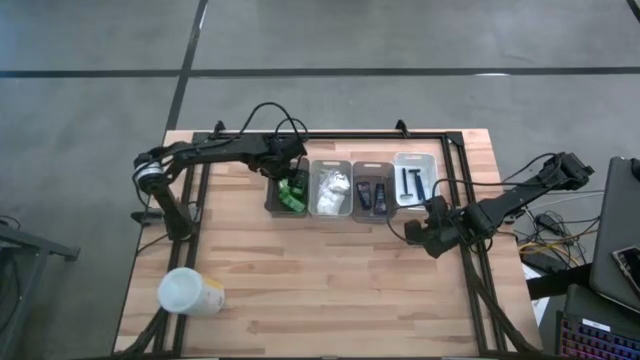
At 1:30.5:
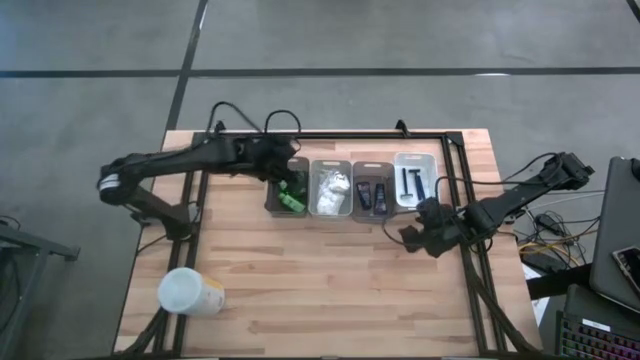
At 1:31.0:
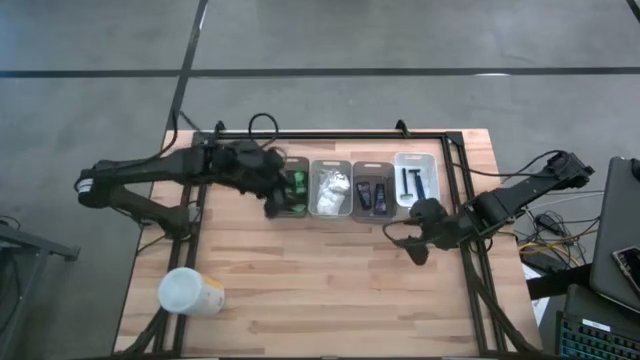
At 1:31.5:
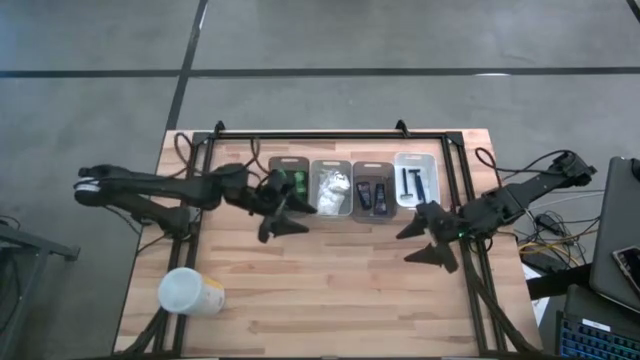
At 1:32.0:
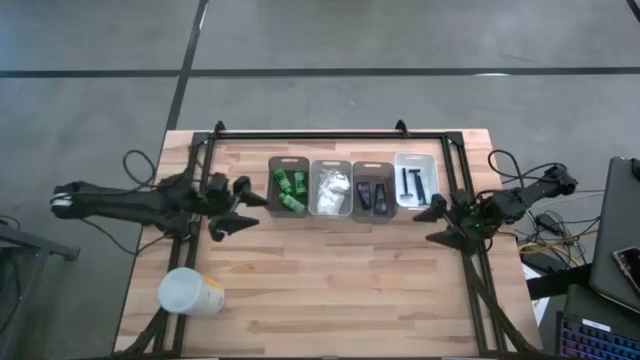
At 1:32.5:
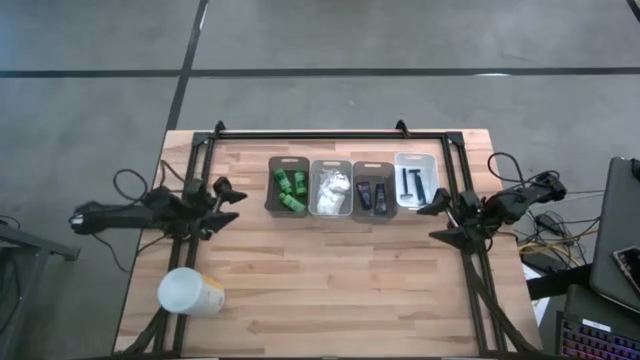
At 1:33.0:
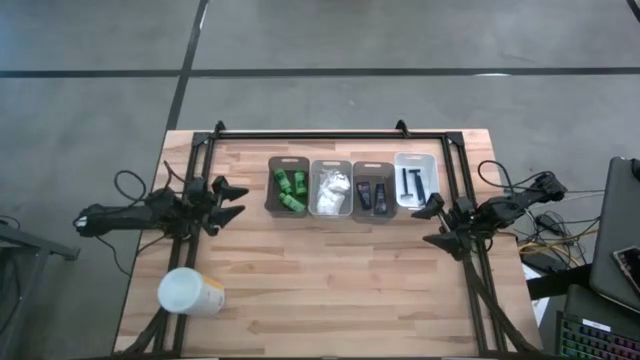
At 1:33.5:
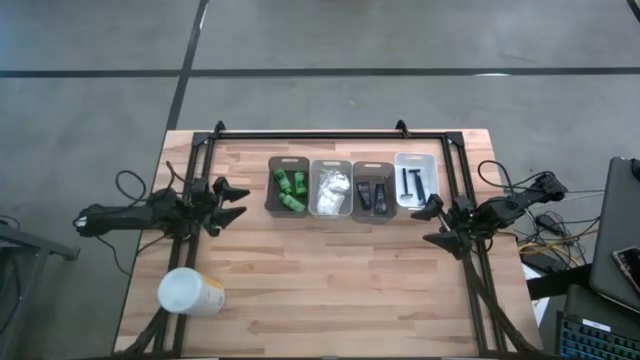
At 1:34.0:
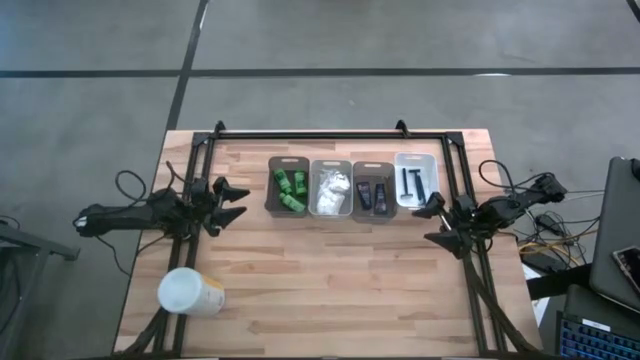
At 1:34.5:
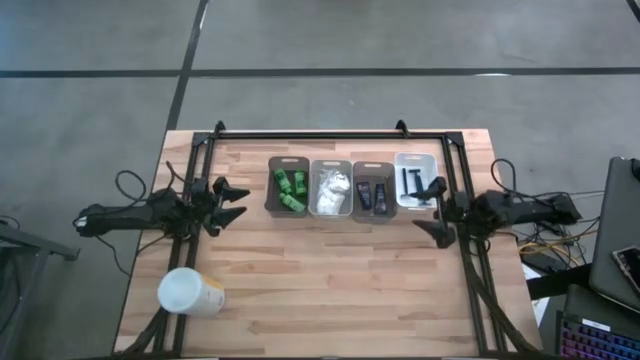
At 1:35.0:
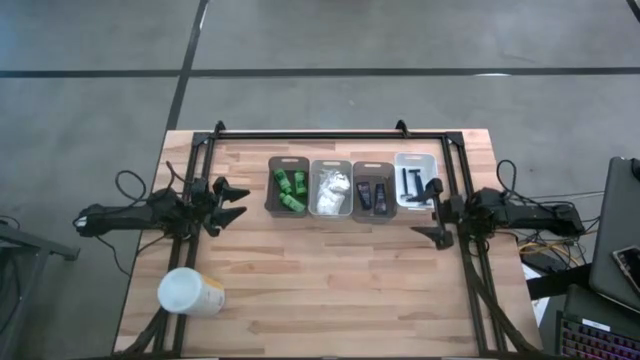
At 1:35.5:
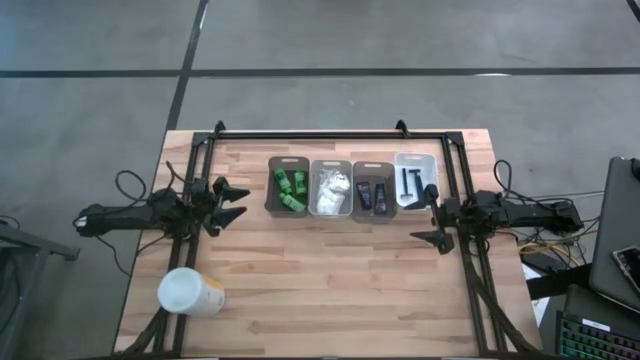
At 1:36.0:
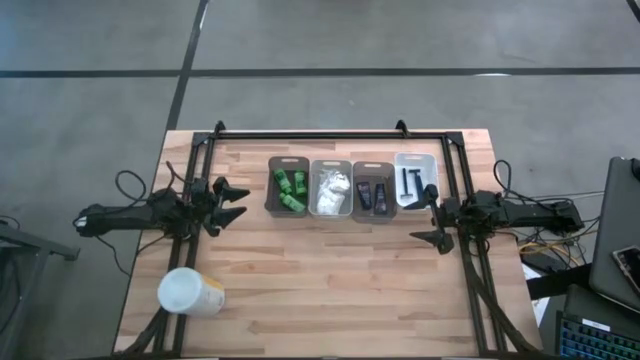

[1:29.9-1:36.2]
Task: Pick & Place Travel size toiletries
Return to Home Position

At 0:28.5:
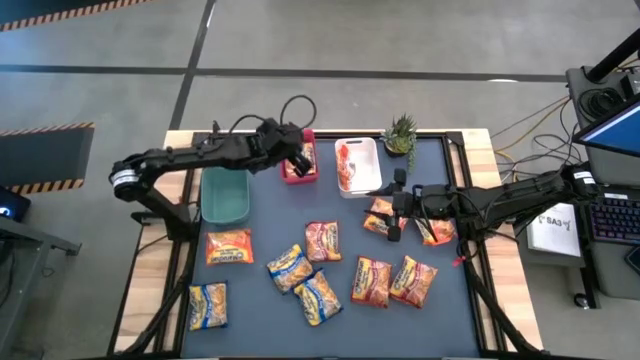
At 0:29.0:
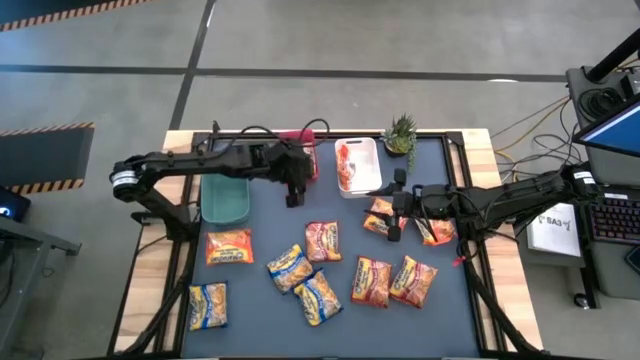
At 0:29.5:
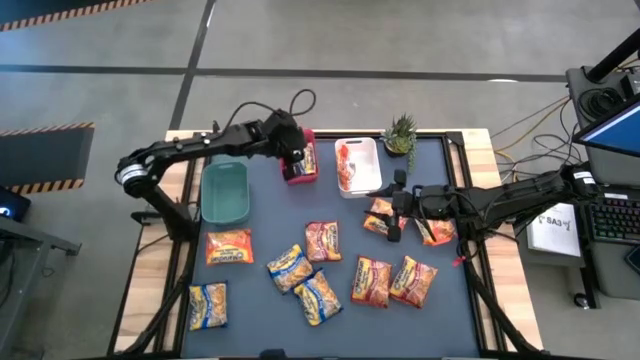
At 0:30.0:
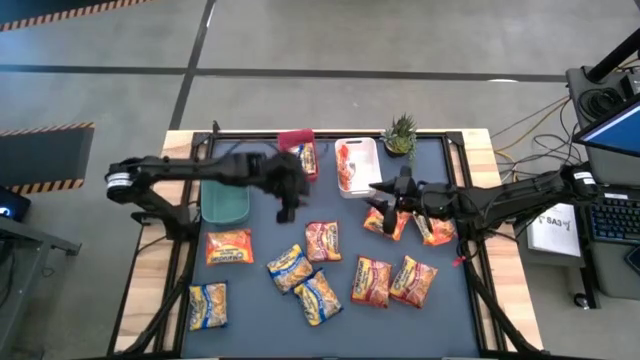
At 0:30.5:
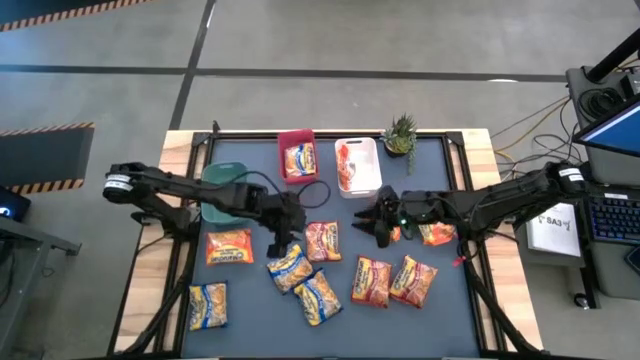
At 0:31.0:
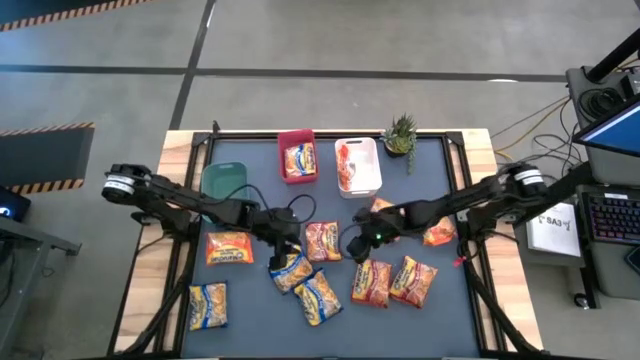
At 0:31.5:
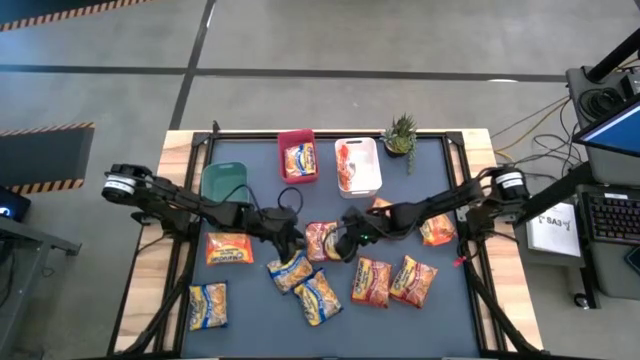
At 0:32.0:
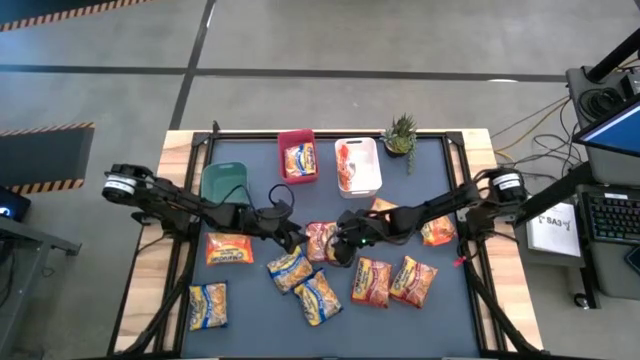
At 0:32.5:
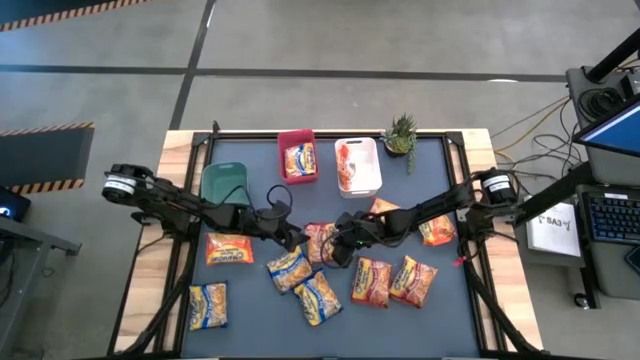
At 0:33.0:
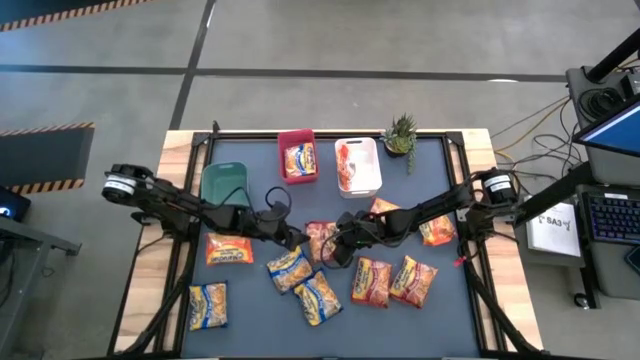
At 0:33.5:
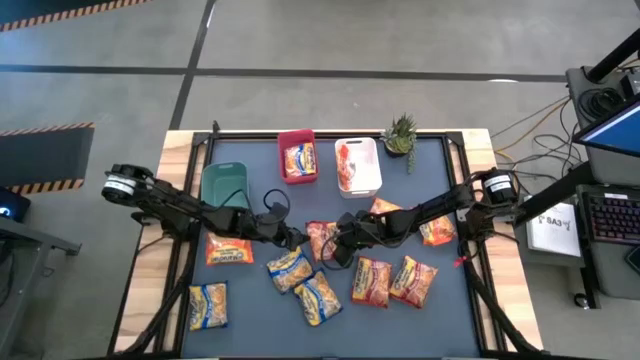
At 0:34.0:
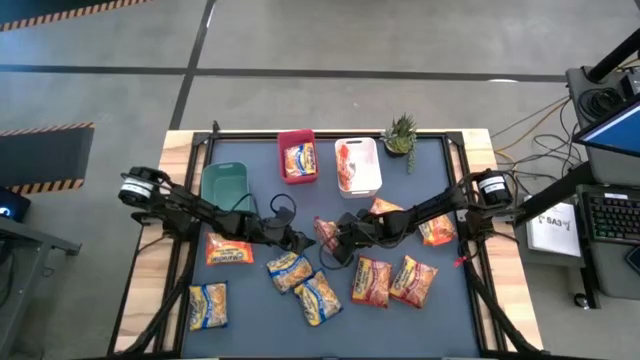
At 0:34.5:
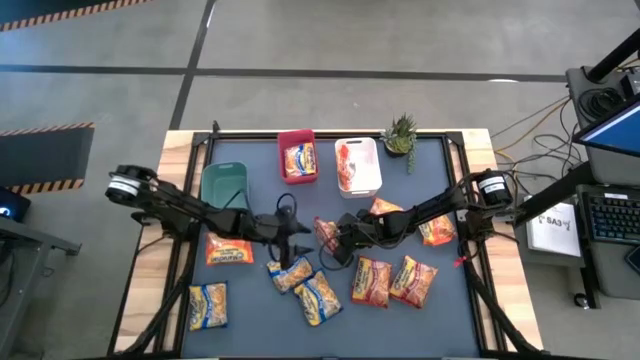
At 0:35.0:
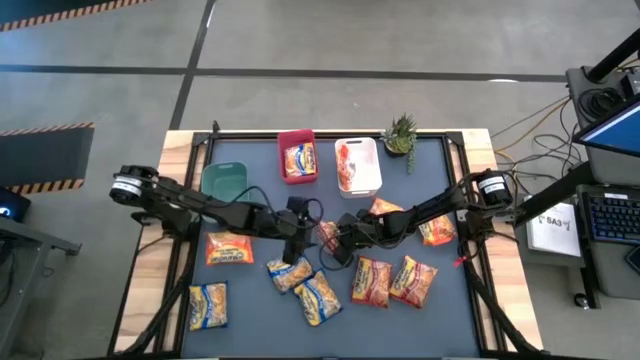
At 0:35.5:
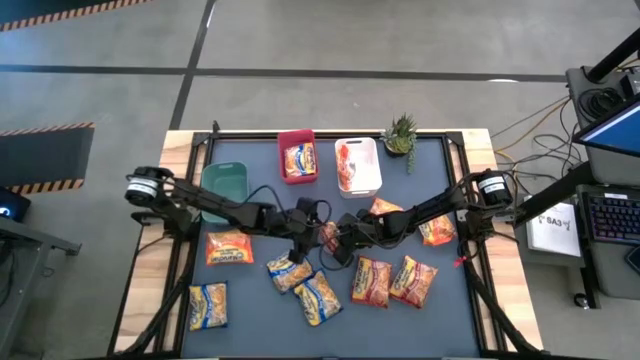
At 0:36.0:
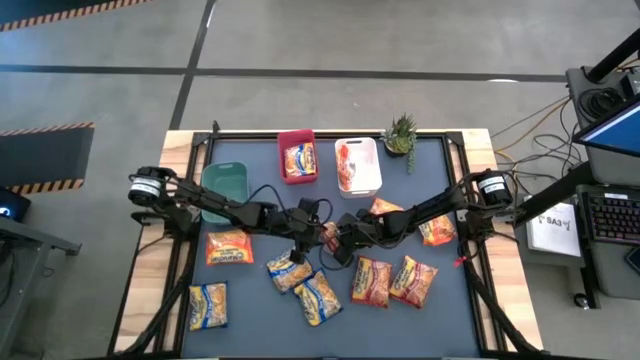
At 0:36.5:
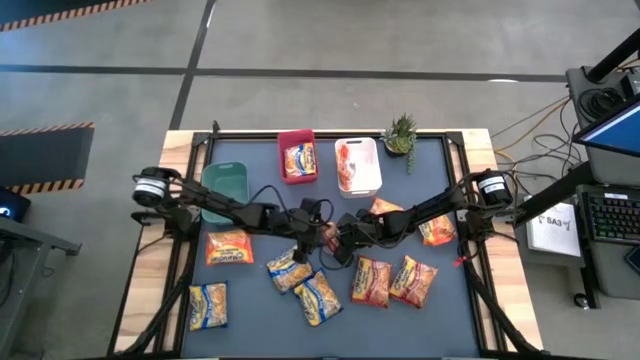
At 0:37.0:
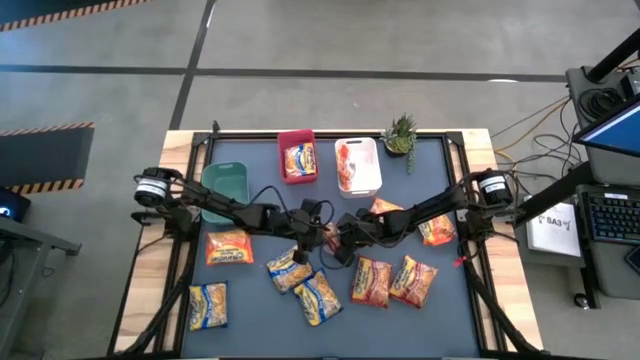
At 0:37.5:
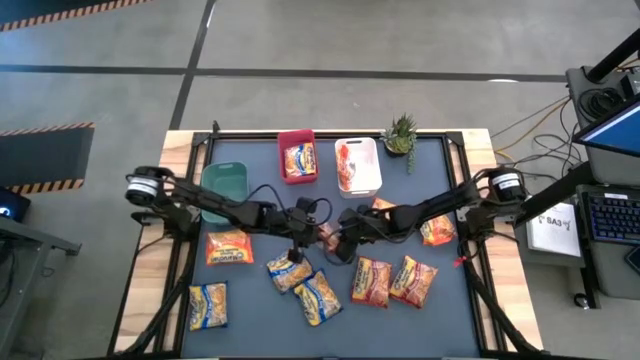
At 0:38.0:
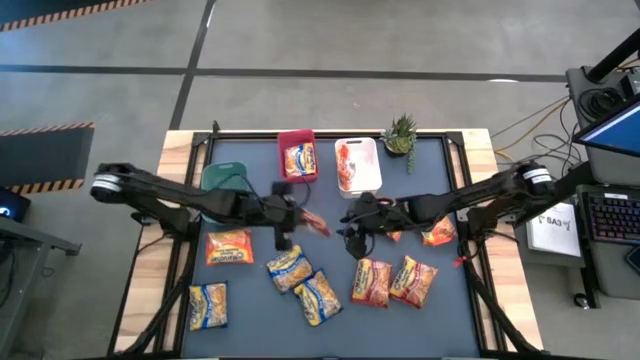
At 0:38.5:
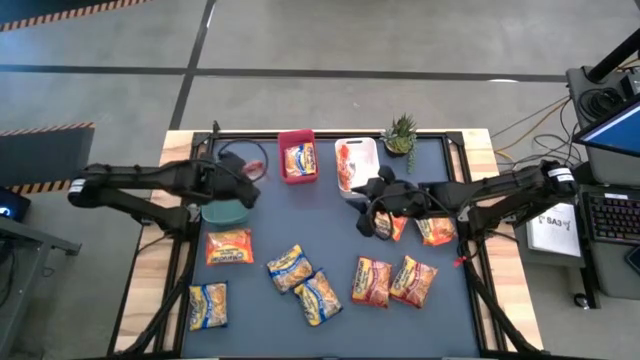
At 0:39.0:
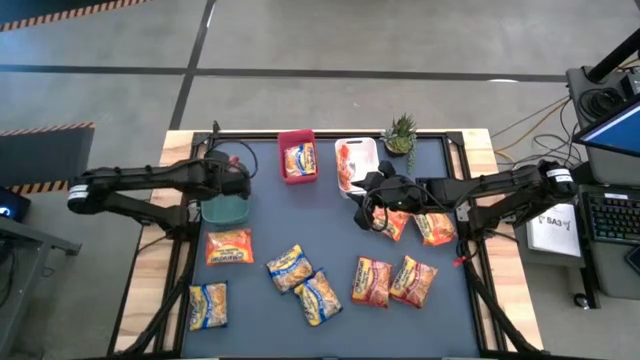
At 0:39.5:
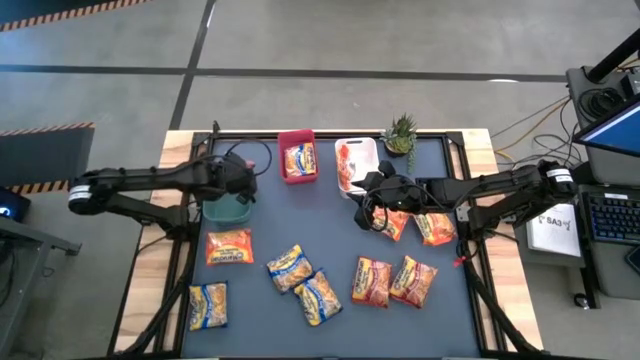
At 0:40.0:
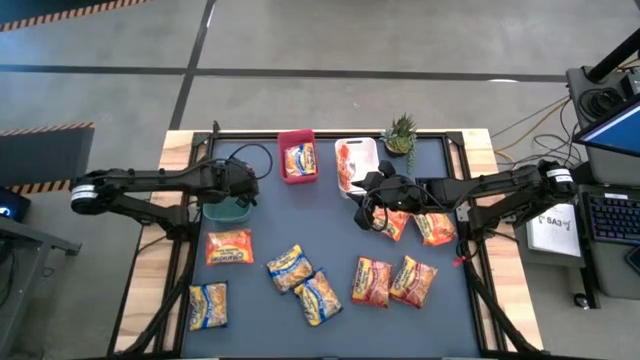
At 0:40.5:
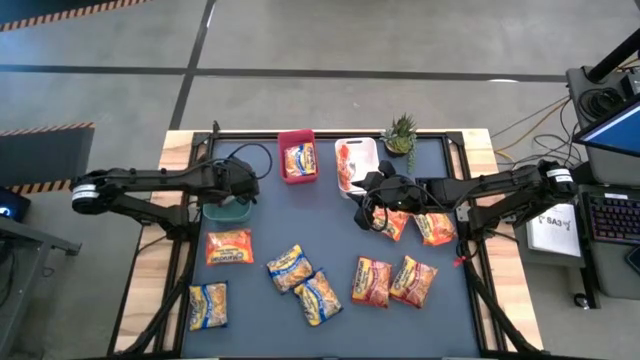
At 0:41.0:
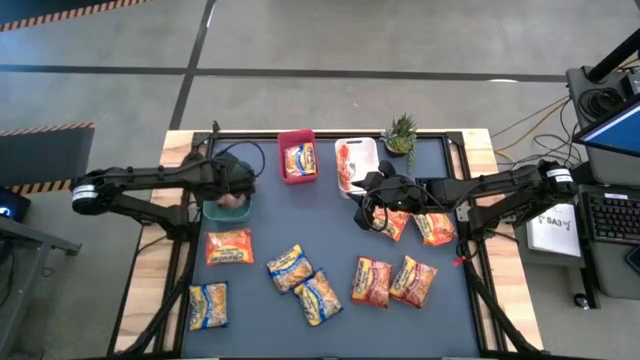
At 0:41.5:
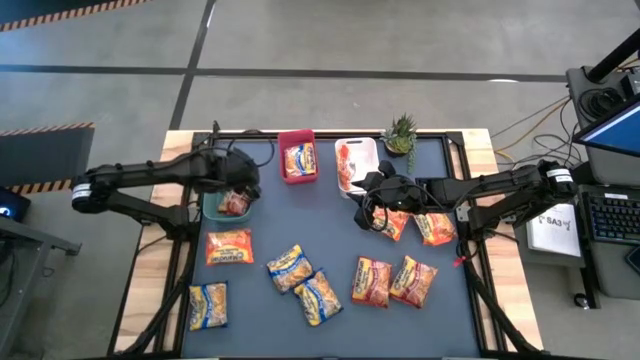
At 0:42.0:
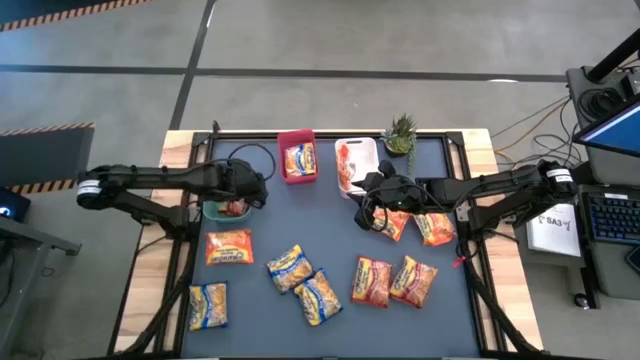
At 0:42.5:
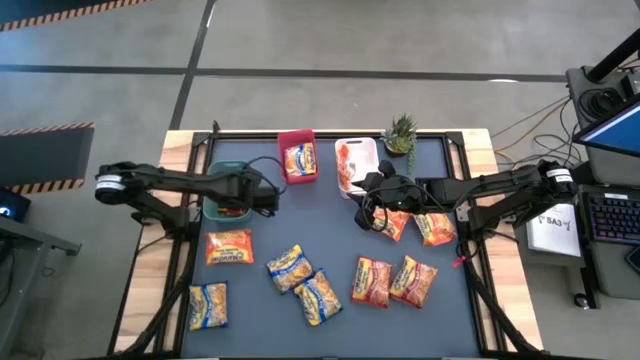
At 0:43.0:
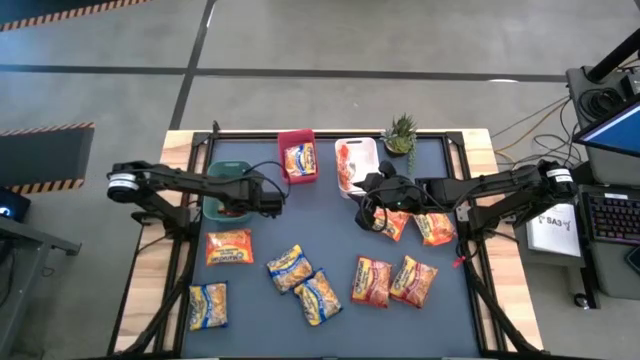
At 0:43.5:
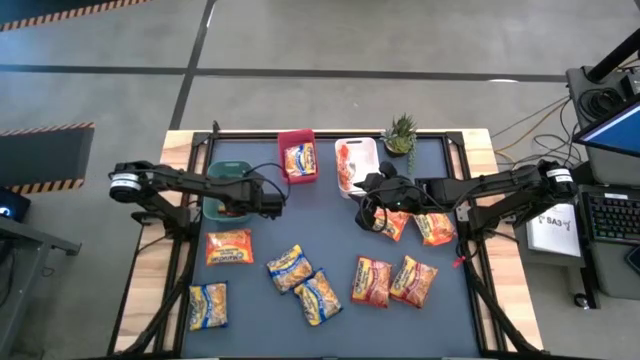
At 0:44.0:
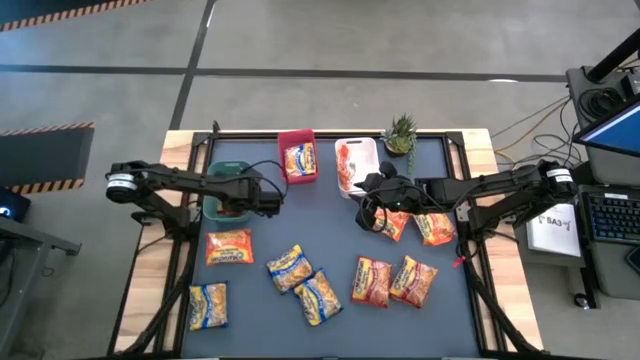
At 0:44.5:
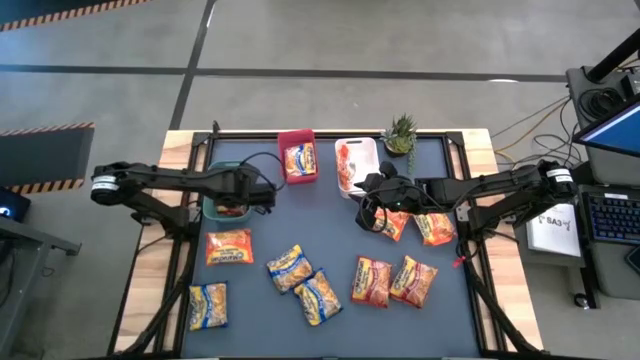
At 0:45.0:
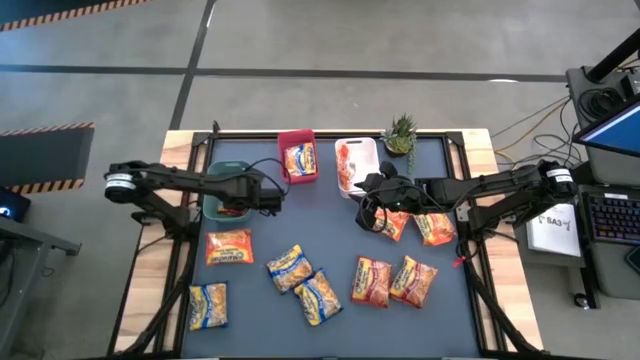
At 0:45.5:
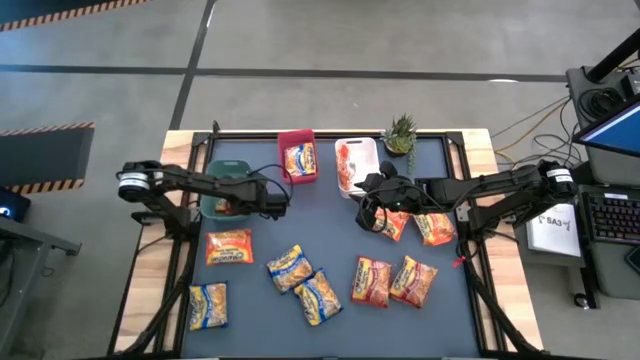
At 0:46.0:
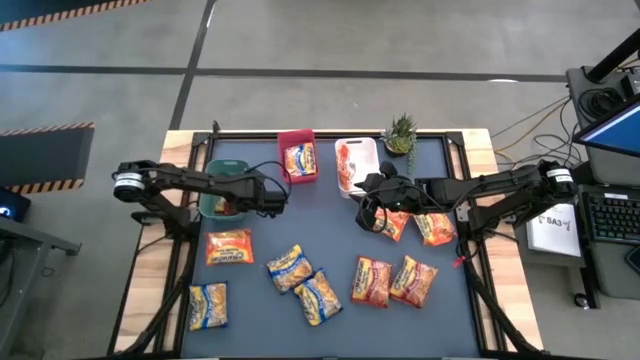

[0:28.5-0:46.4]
Task: Sort Maruchan noodles
Put the red noodle pack into the green bin
